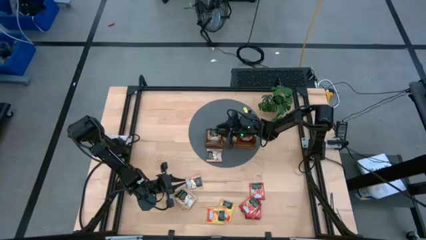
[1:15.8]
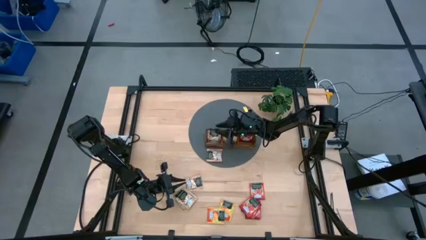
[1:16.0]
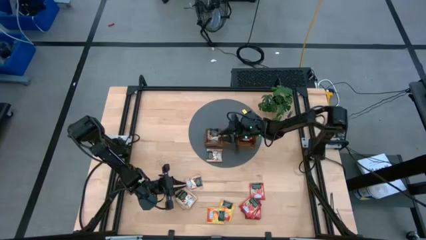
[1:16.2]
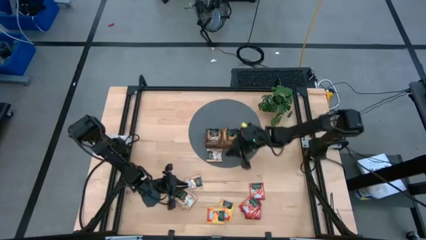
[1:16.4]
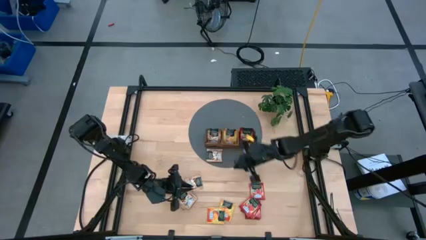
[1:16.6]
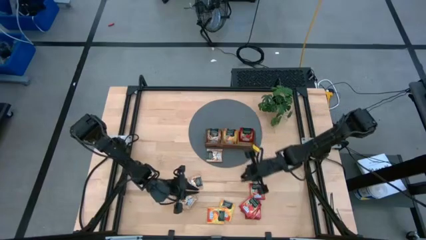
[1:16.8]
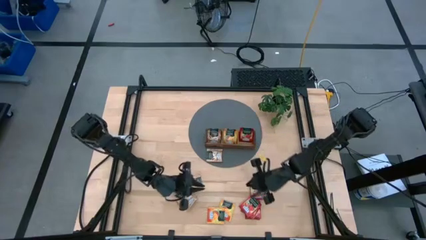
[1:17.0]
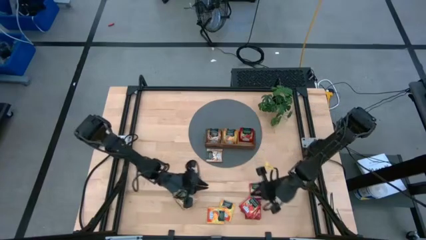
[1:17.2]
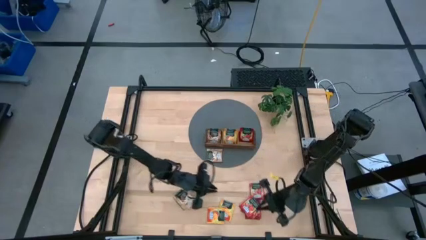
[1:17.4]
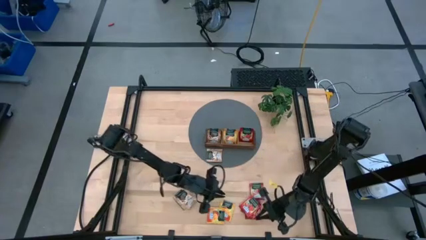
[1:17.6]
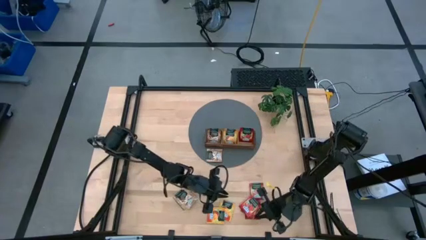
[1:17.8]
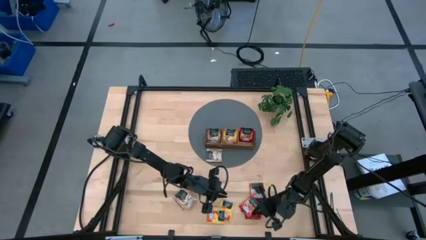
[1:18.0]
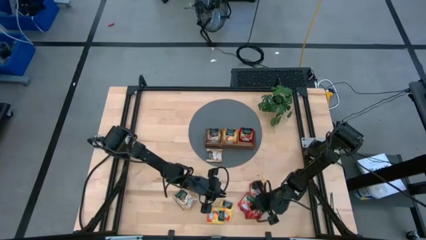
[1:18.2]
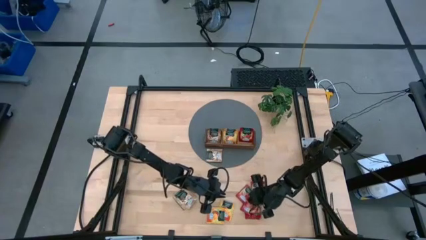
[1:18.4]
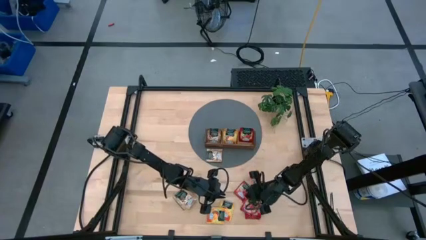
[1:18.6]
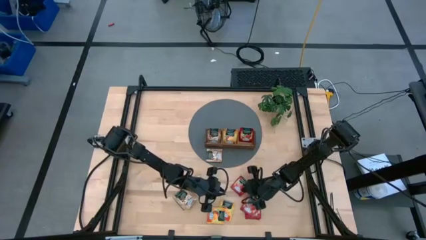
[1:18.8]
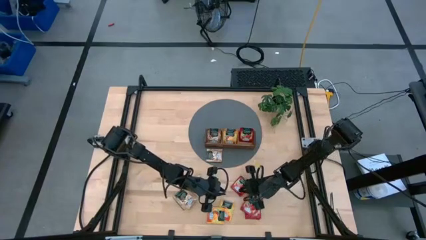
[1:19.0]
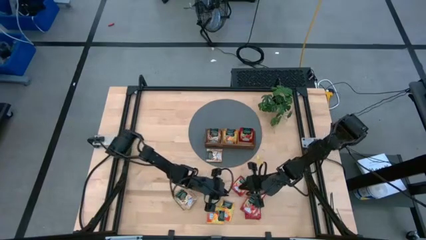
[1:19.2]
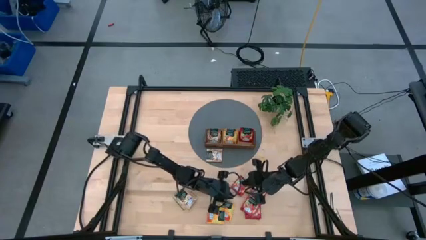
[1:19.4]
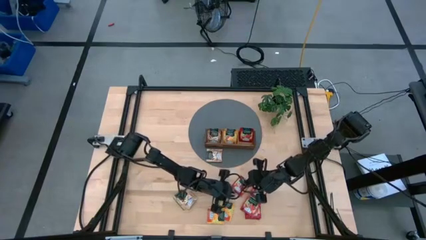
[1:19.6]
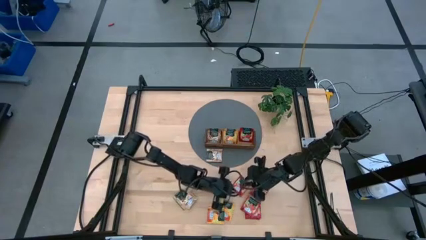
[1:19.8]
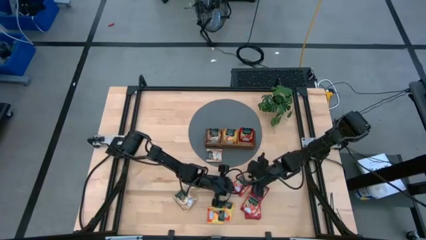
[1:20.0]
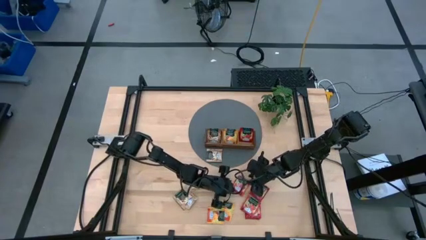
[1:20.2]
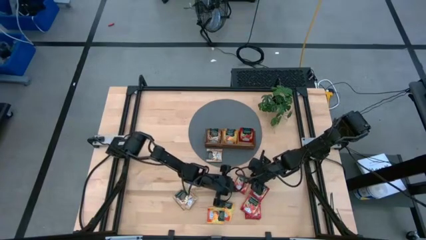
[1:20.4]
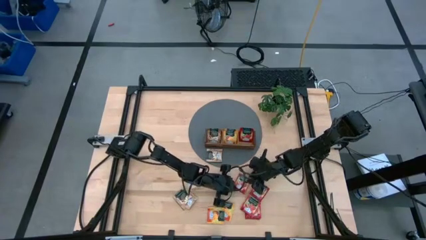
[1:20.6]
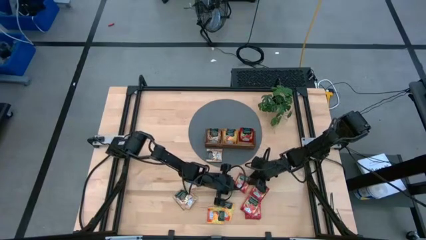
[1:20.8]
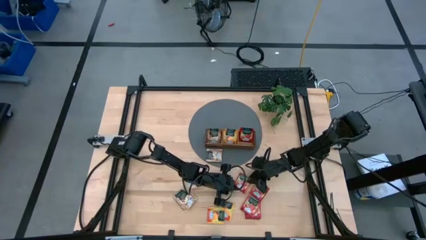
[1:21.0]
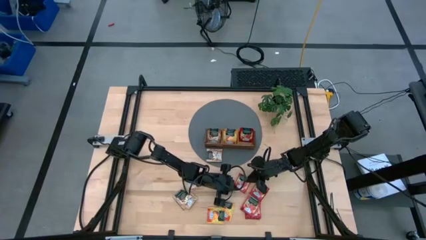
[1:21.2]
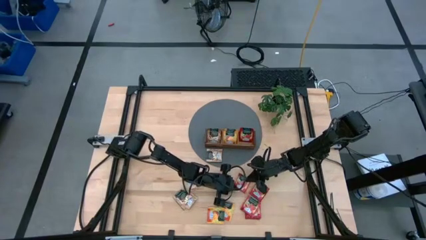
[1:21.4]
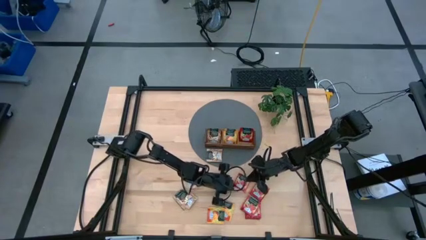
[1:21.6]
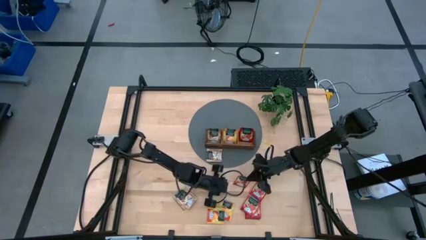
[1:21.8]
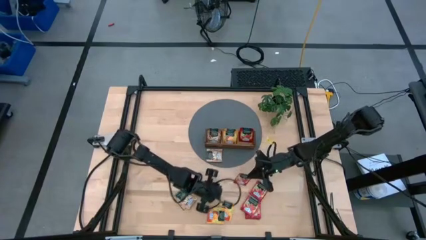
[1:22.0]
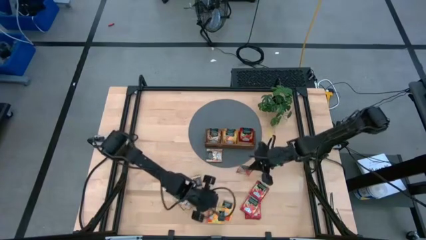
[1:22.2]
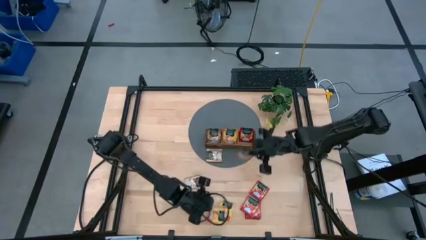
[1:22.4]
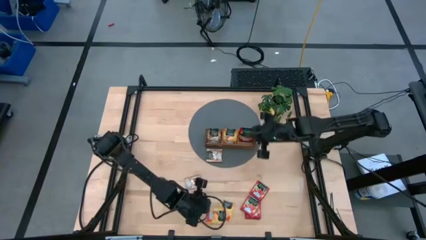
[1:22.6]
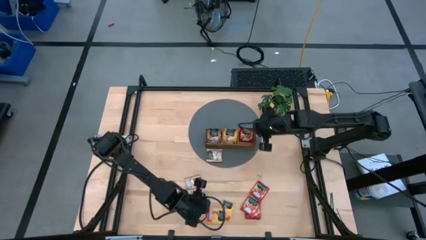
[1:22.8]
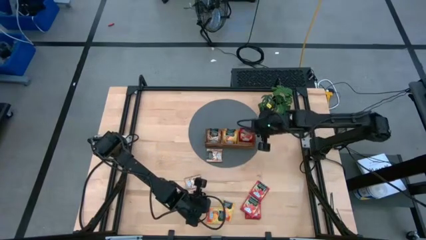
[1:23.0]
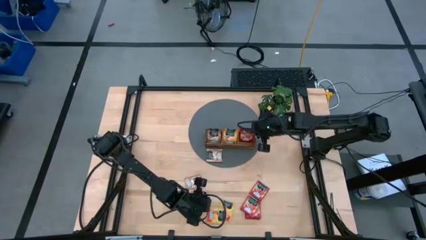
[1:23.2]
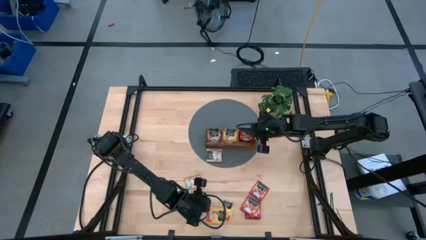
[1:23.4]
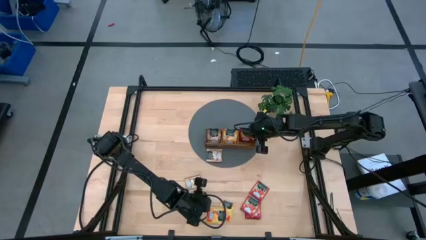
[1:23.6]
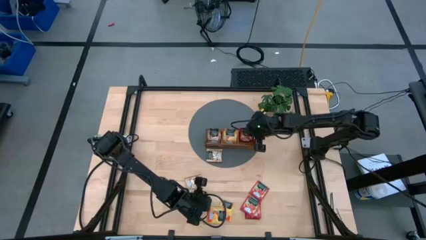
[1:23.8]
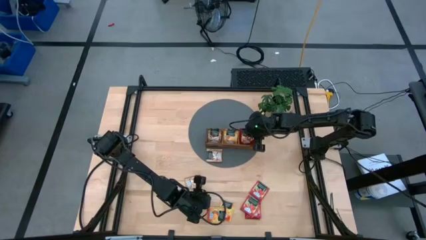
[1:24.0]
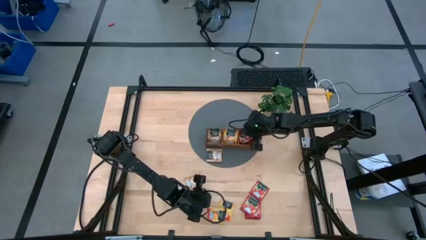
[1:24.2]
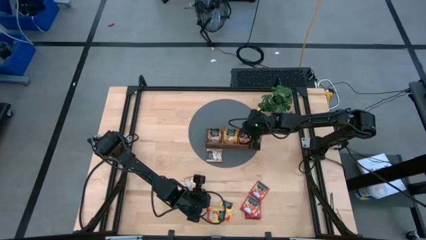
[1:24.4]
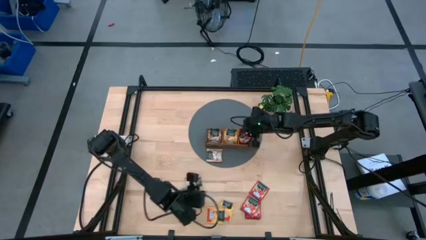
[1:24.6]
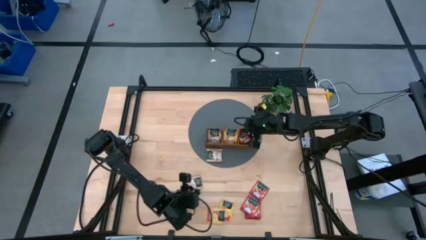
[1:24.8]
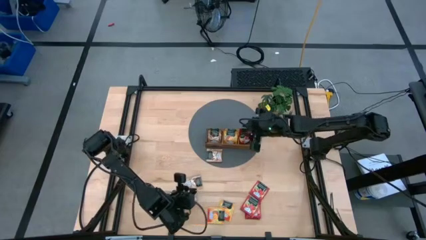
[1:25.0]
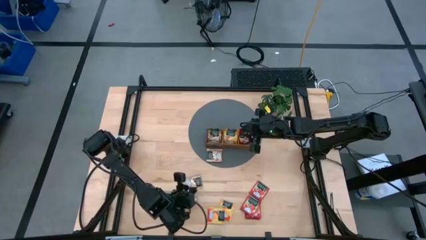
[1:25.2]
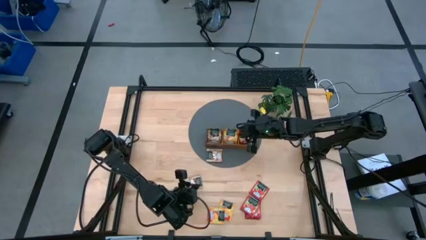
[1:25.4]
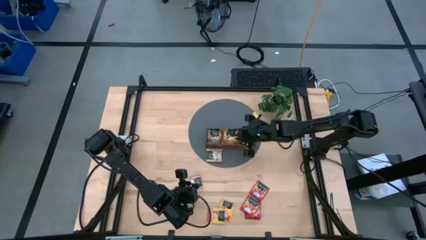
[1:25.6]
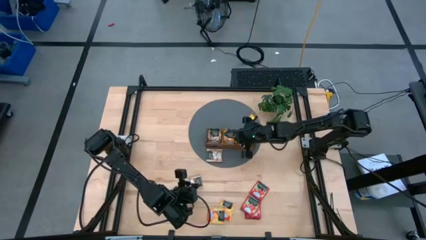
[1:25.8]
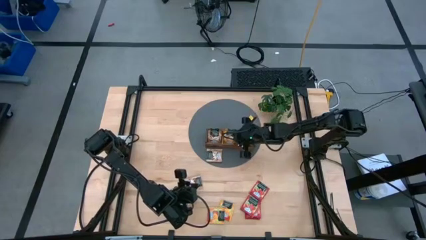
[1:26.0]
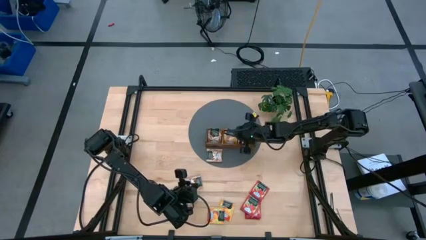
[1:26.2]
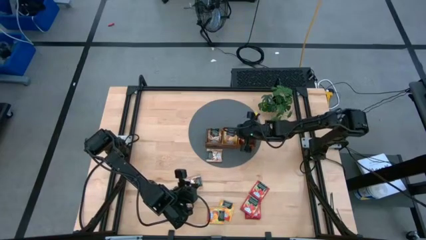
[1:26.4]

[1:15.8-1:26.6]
Task: Pick & Place Tea
Put the red tea packet into the right section of the wooden organizer
